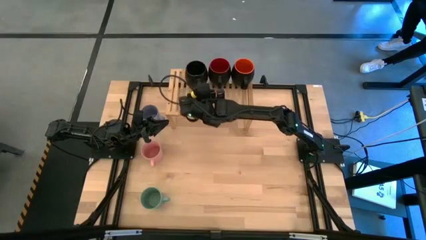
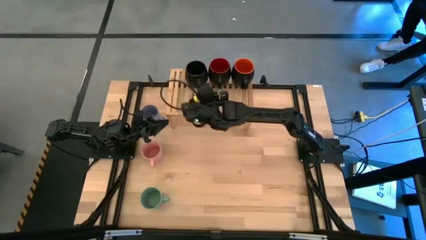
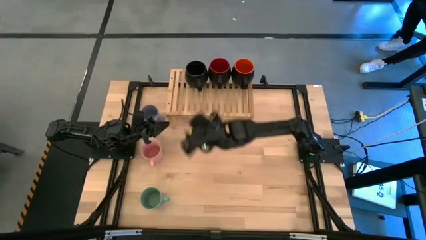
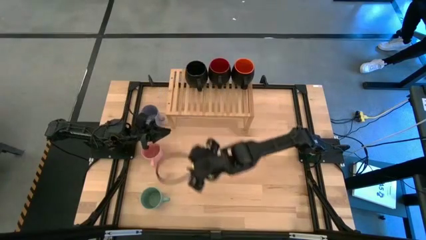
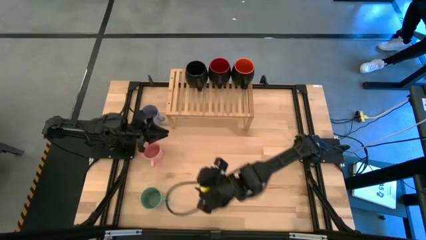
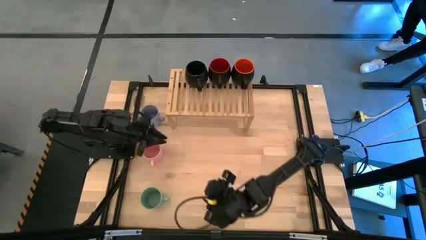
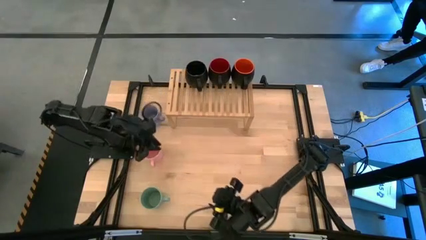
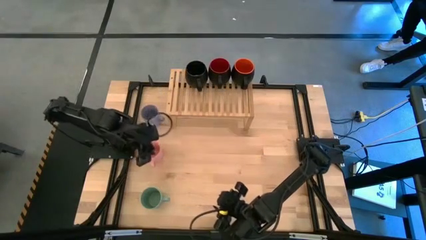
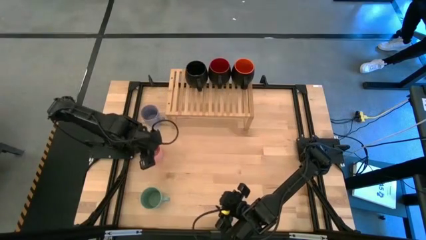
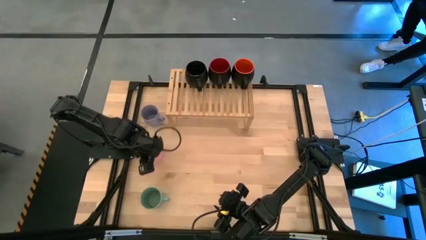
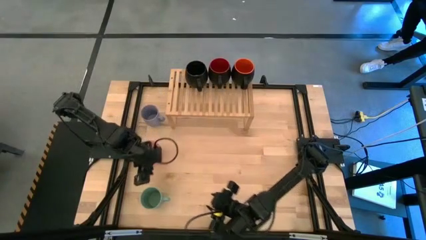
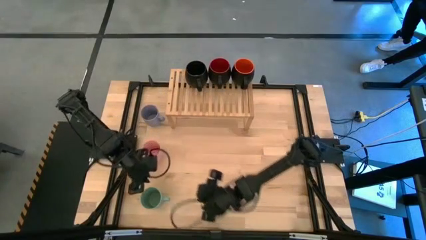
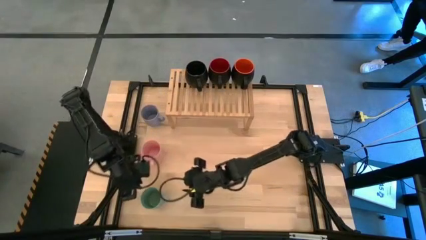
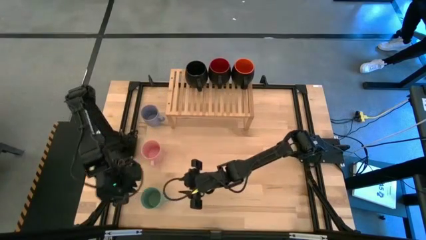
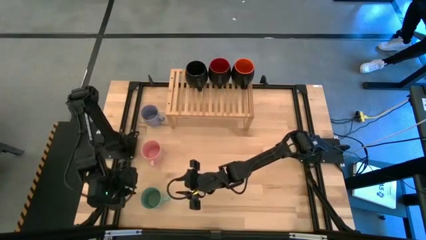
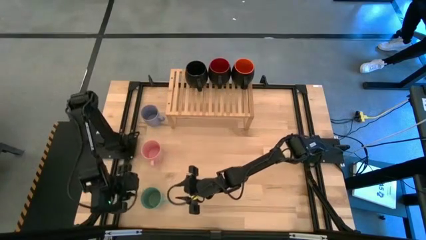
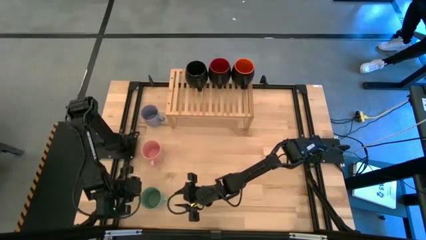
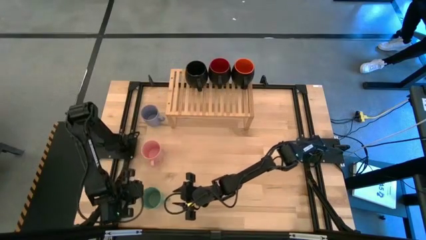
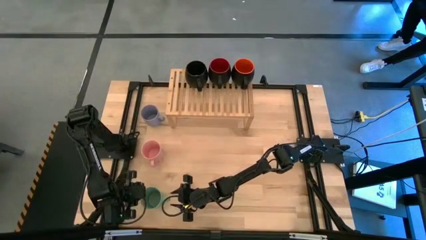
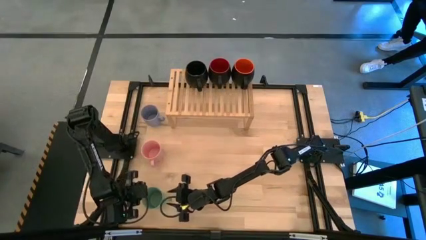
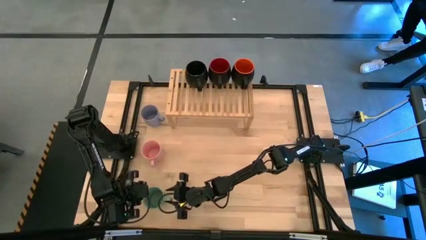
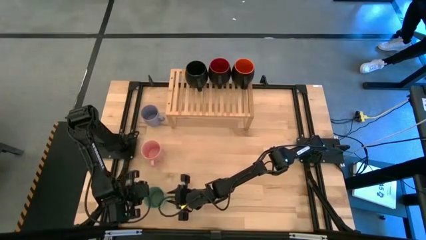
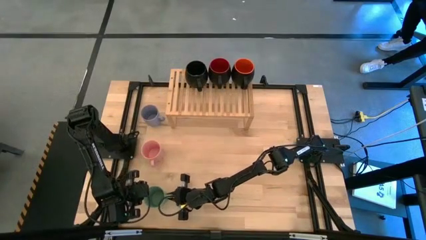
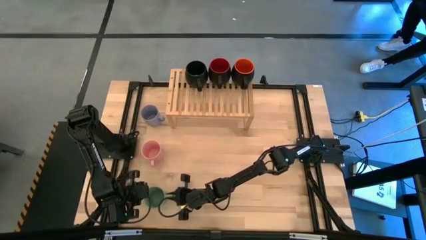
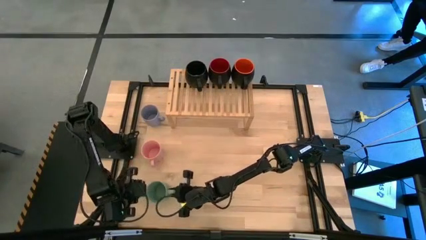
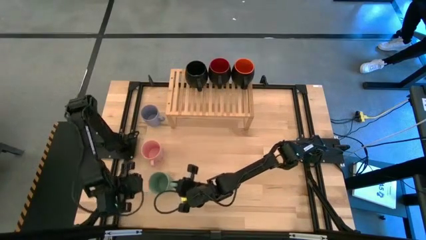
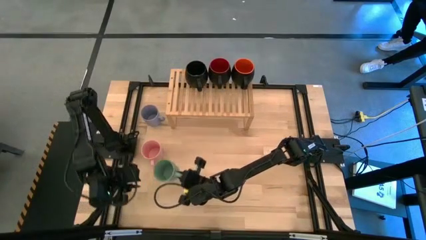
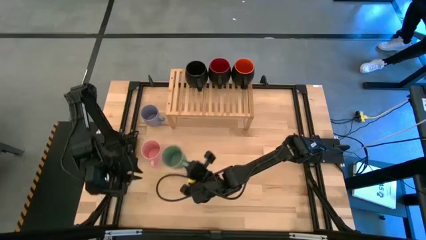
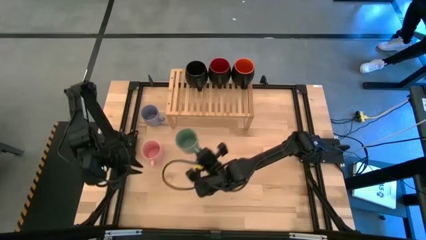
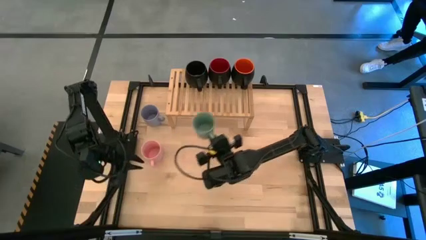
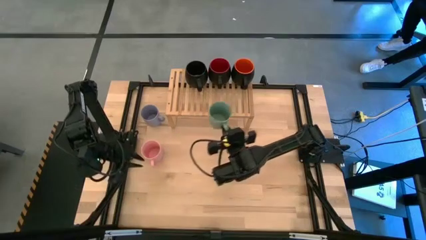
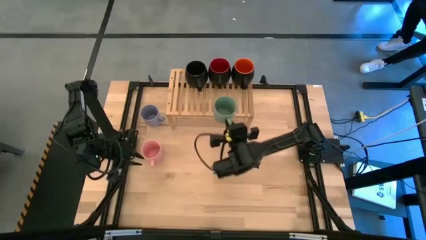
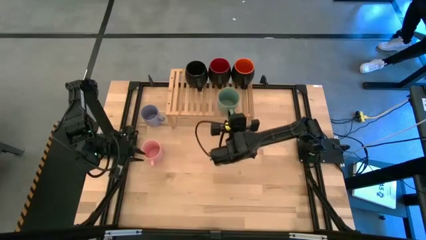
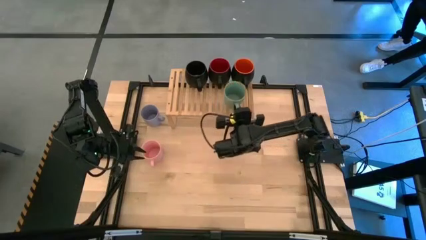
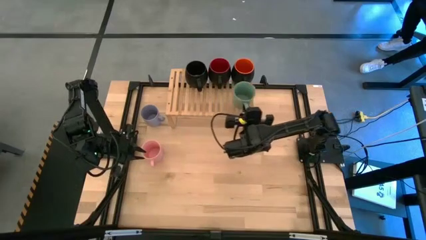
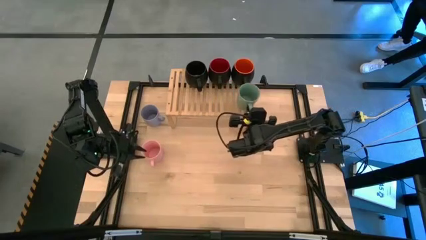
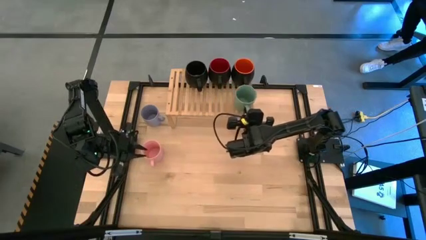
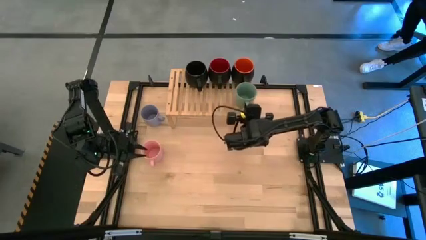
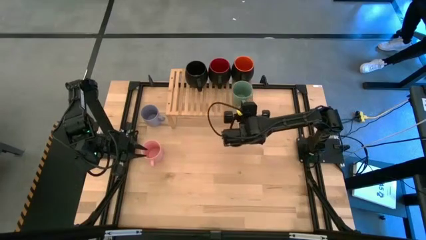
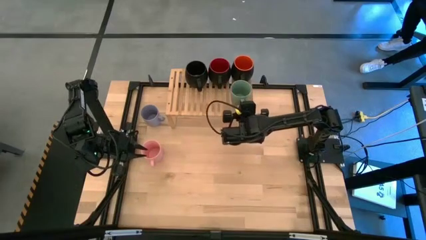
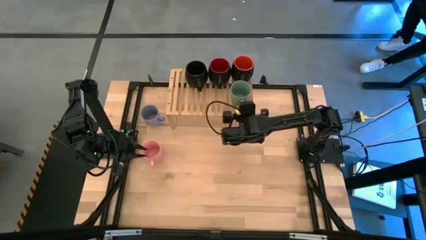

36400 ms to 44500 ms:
Task: Place coffee mugs
Put the green mugs on the shelf

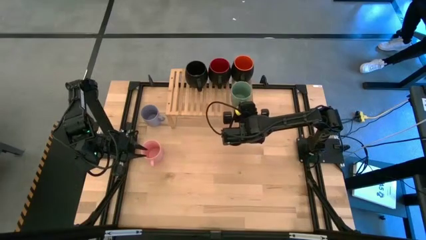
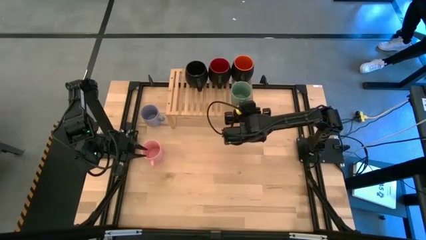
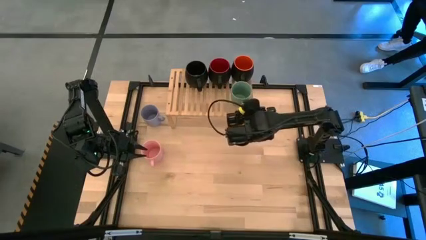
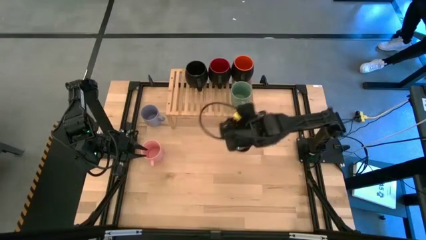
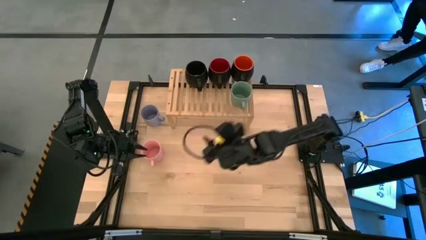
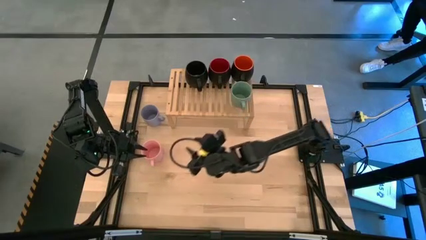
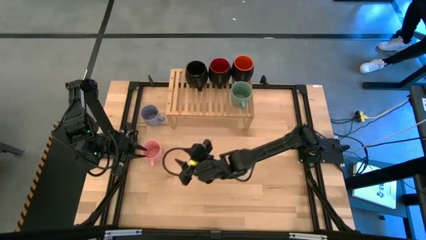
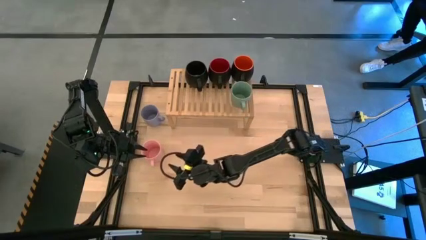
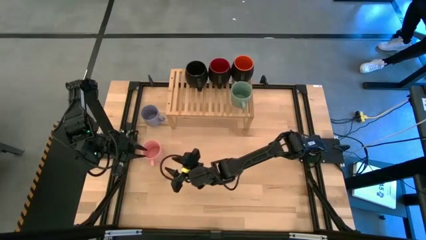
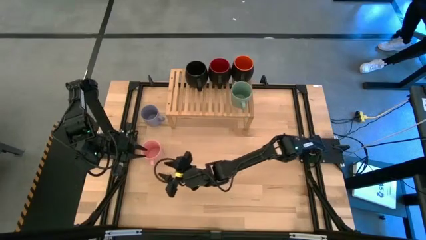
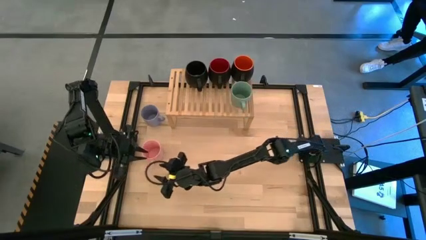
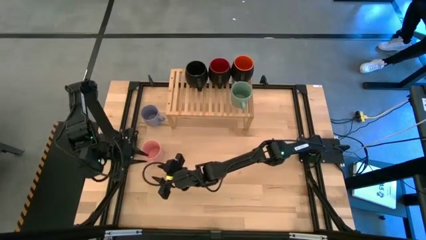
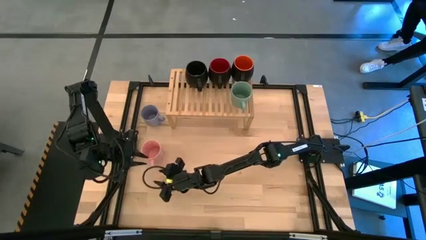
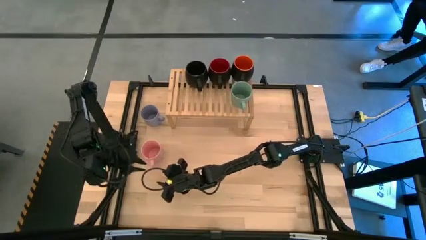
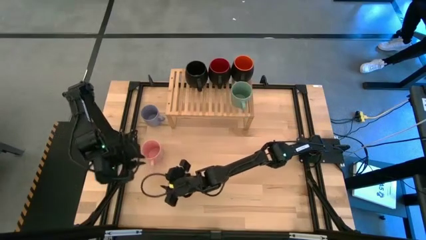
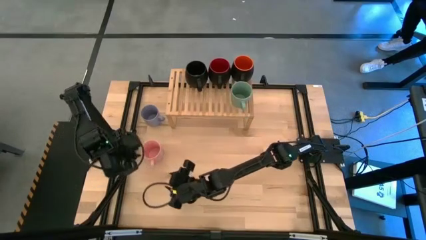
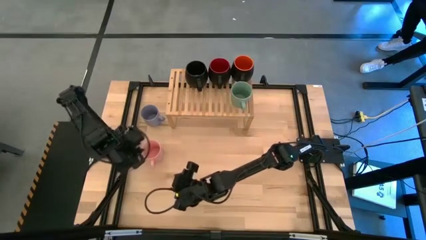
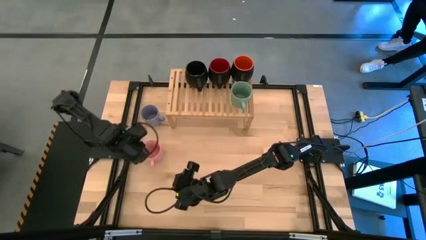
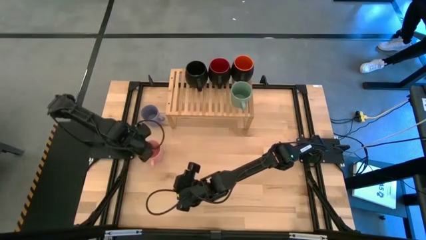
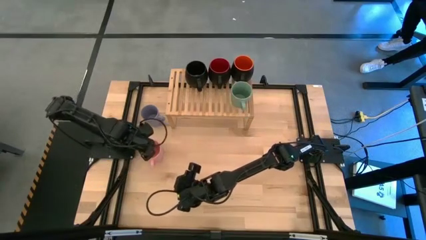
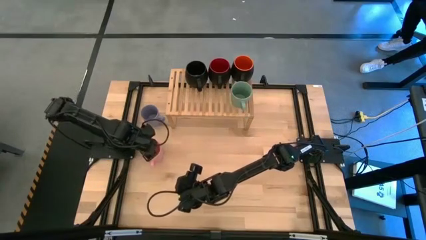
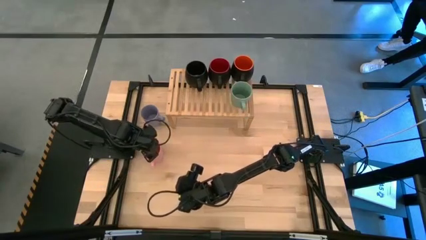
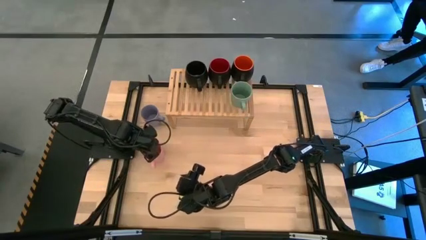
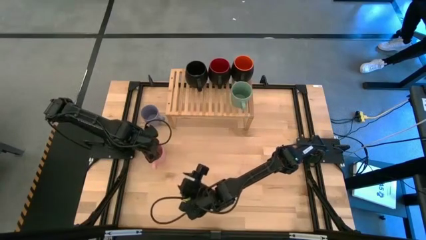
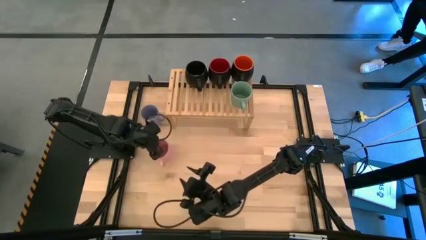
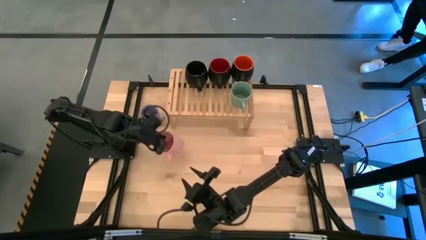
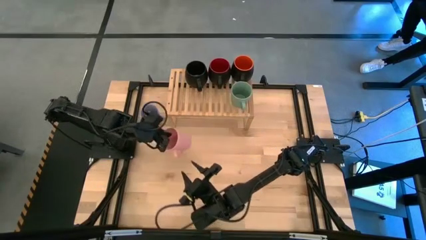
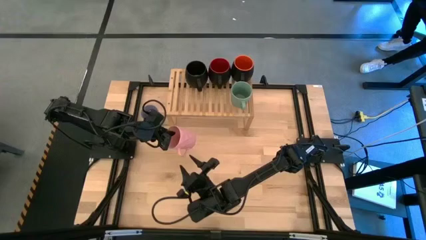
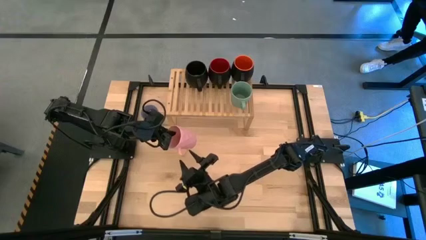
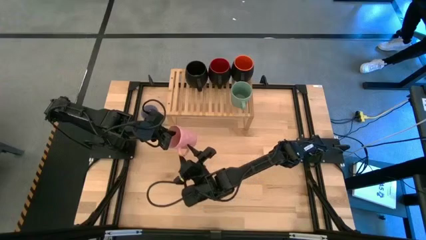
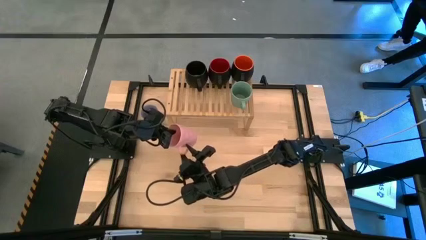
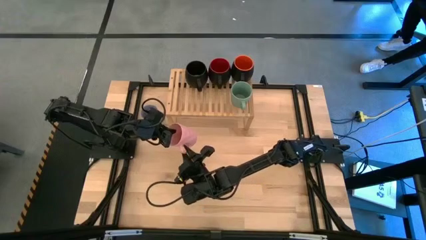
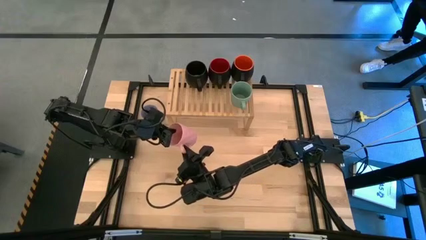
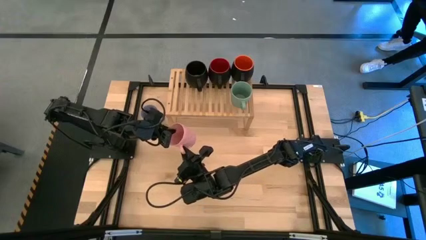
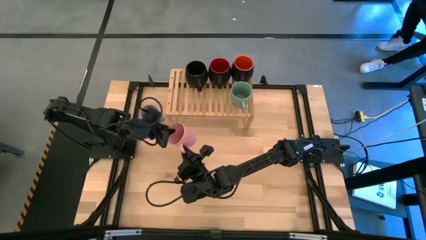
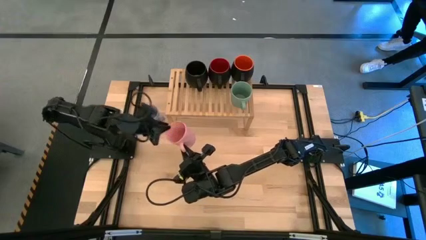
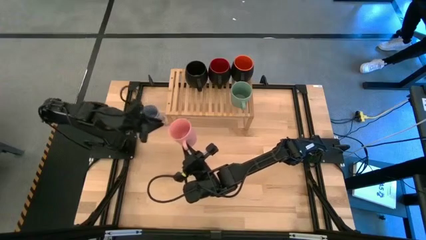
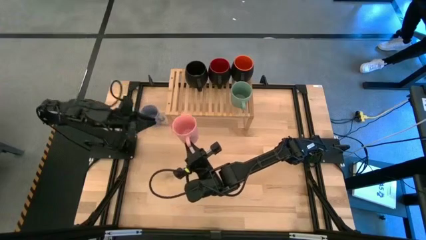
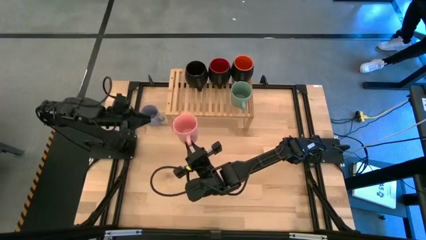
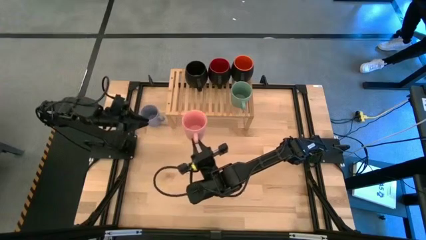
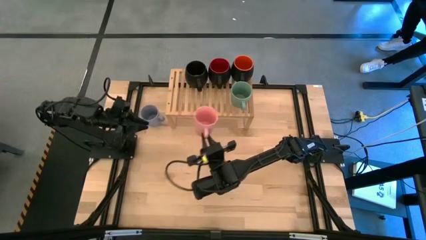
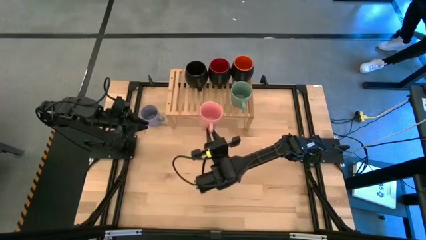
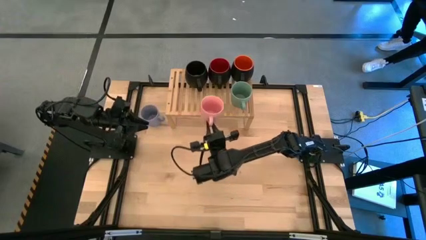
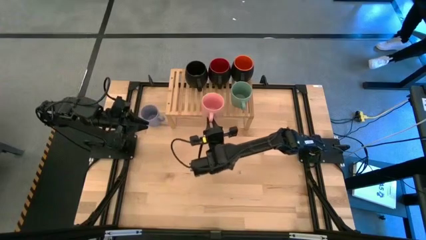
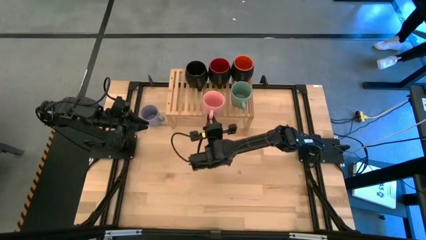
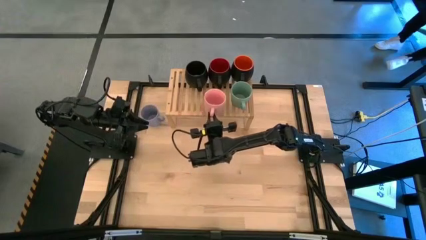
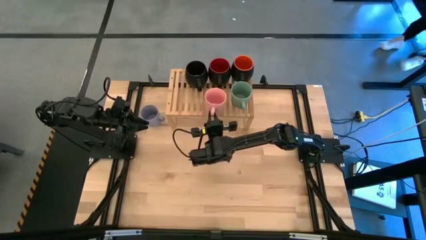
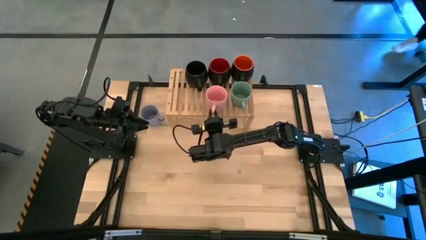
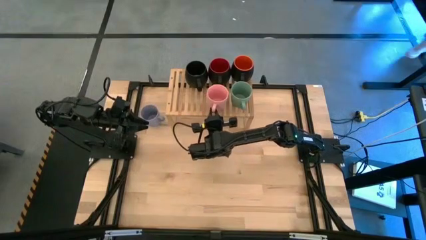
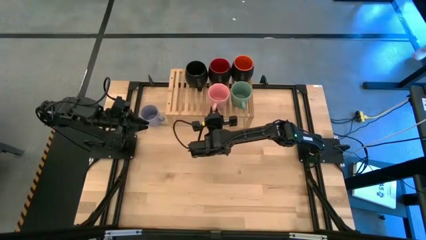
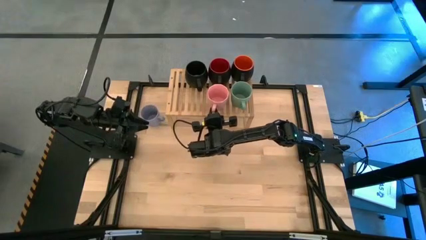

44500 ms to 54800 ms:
Put the pink mugs on the shelf
